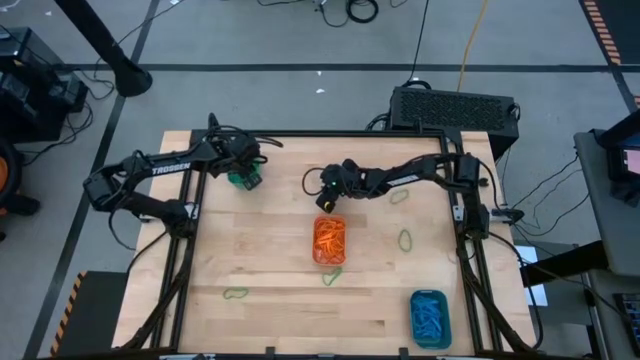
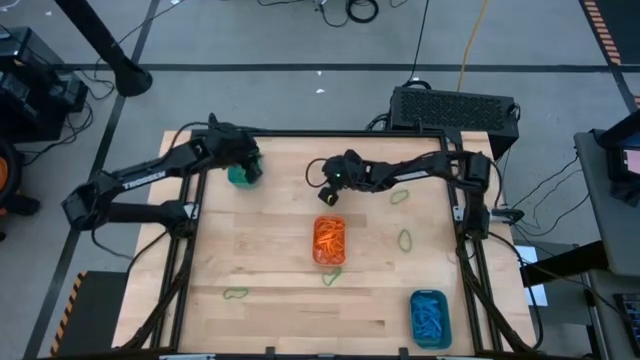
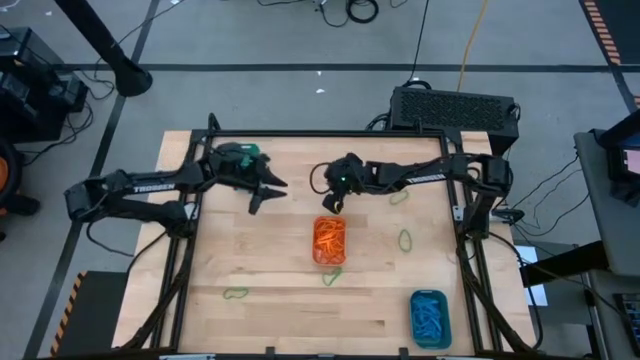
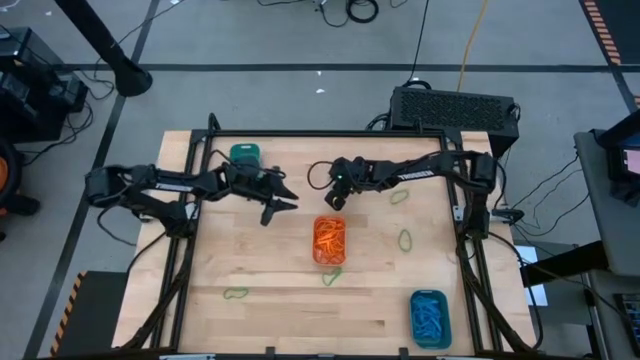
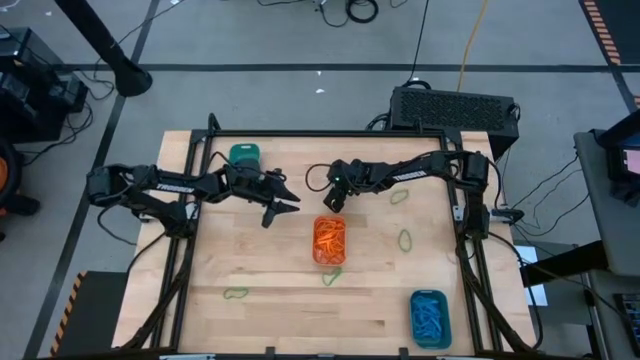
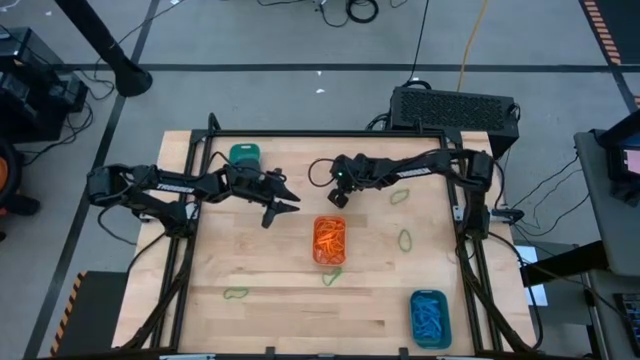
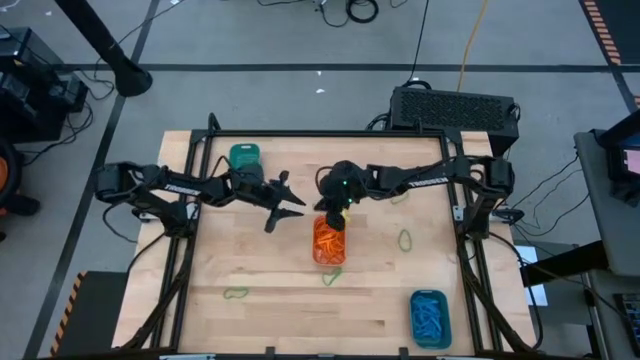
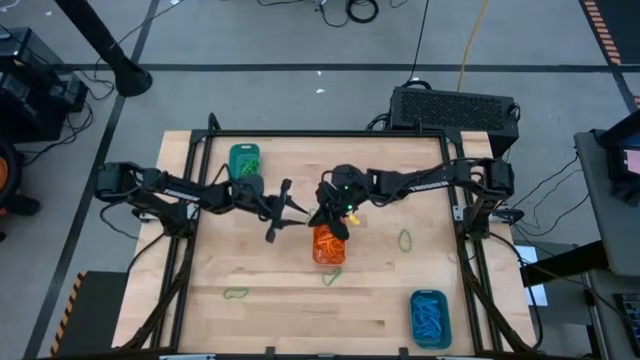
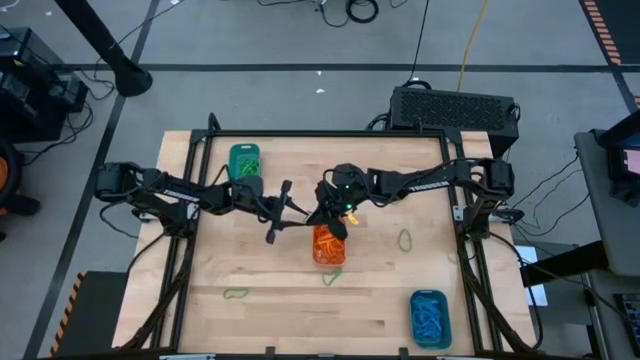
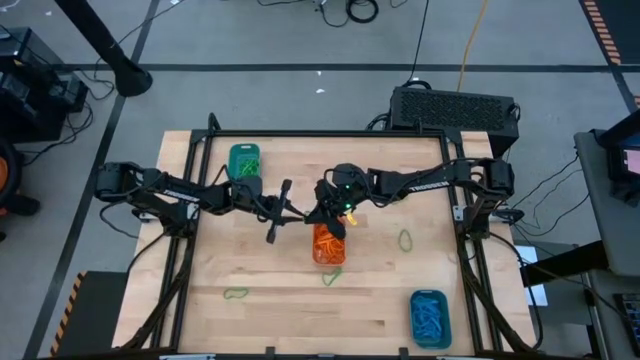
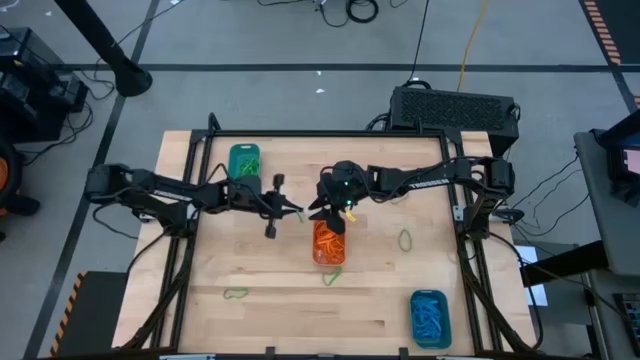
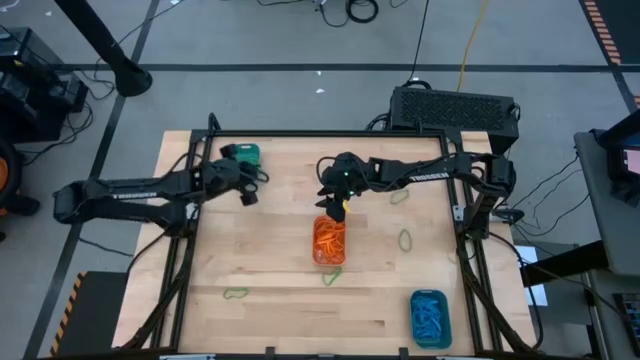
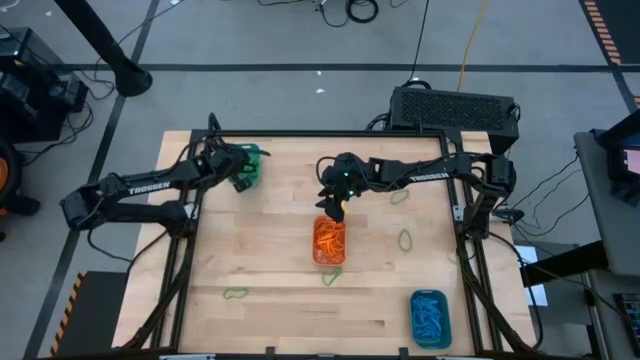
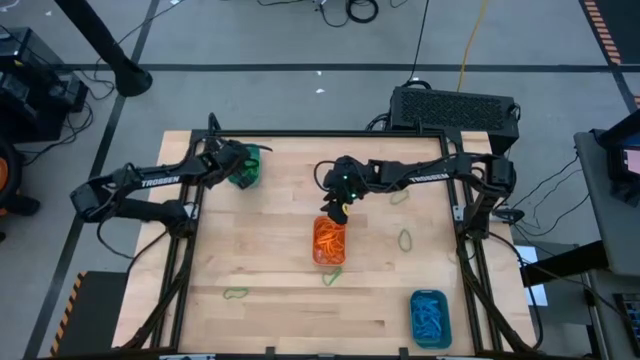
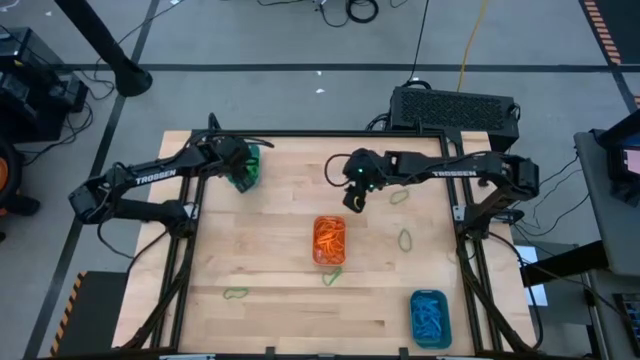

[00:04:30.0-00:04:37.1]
Task: Sort rubber bands into baskets
Put the green rubber band into the green bin

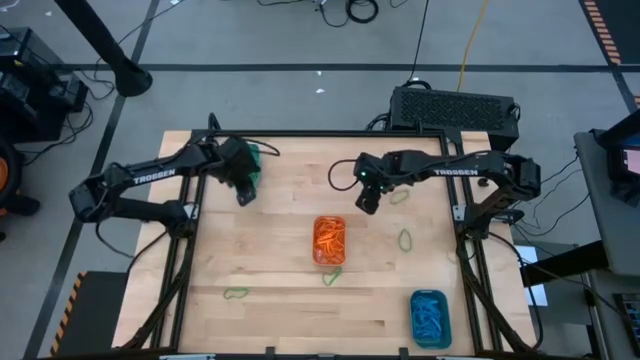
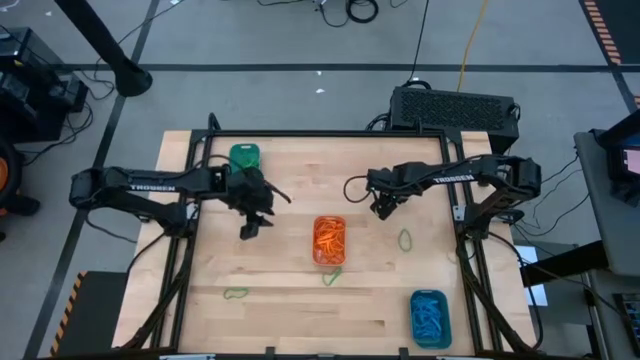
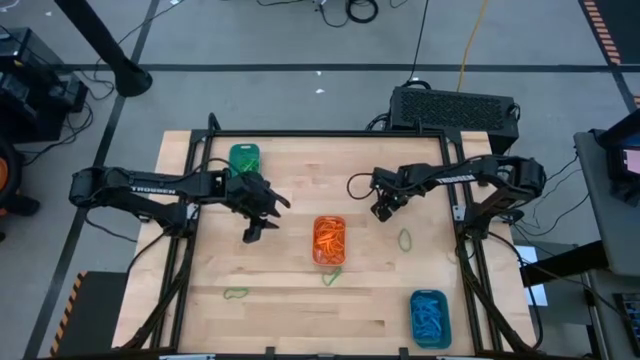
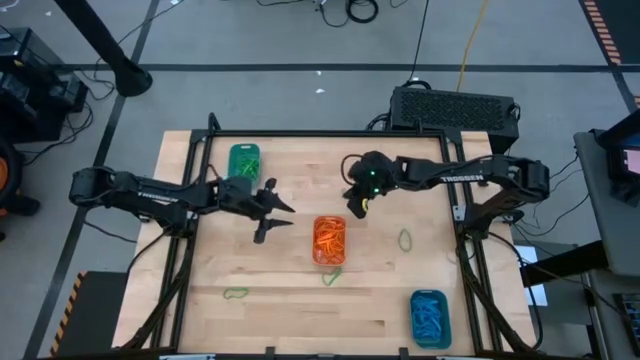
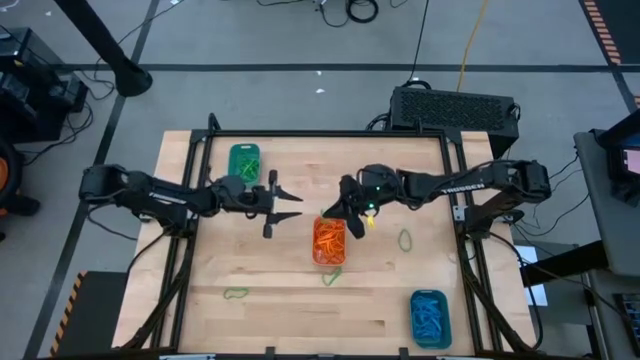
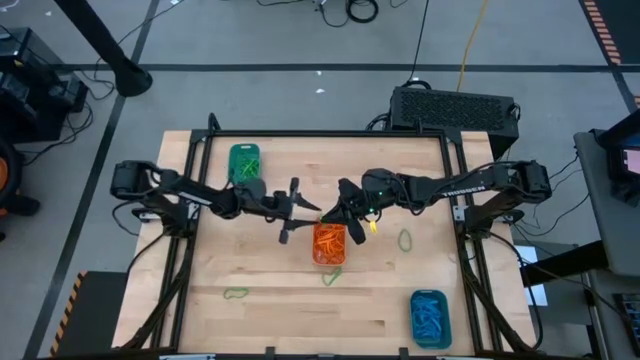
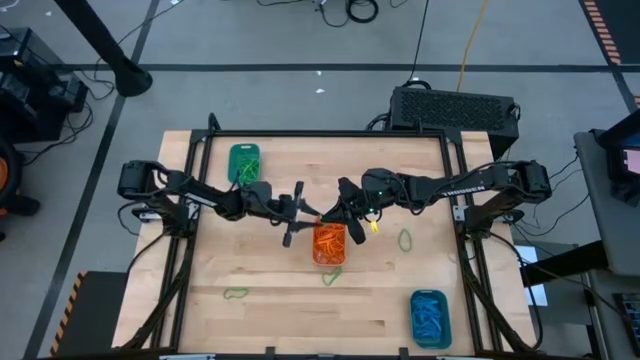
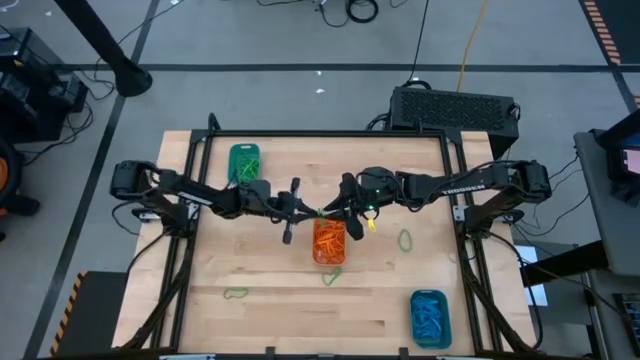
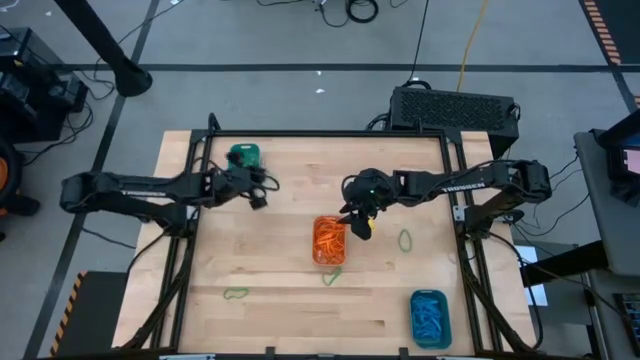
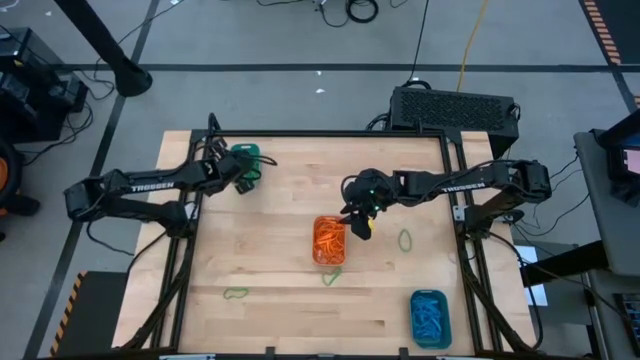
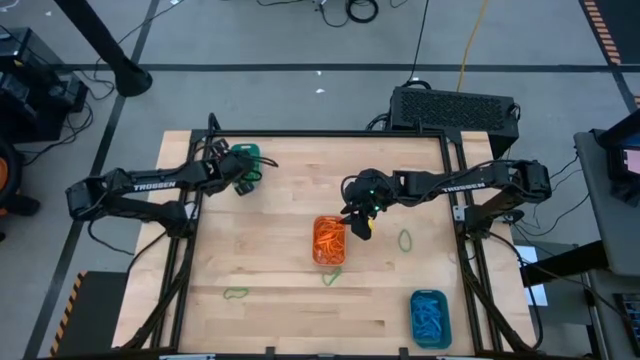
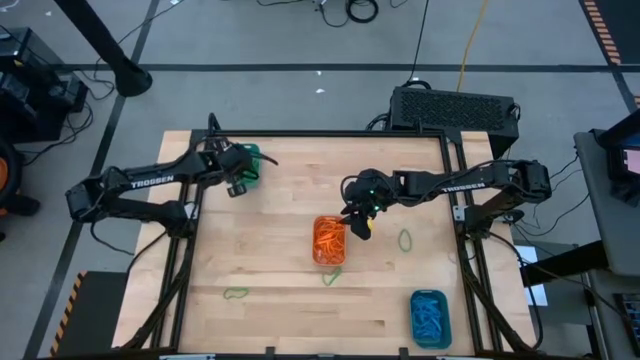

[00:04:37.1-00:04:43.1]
Put the green rubber band into the green bin

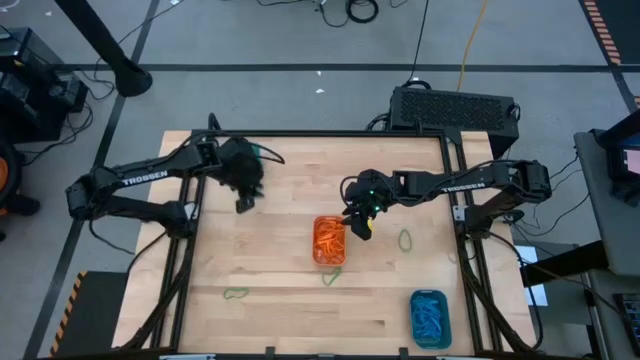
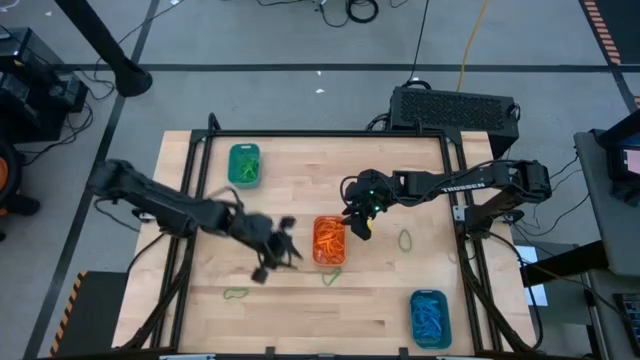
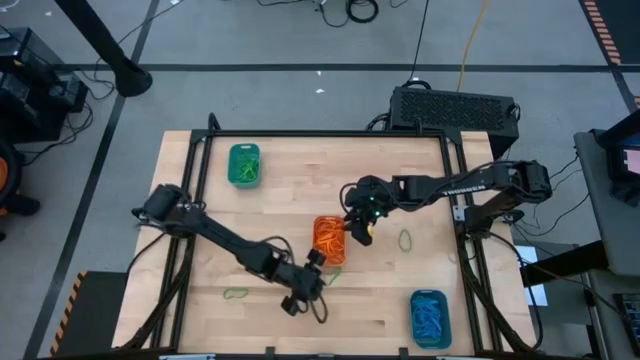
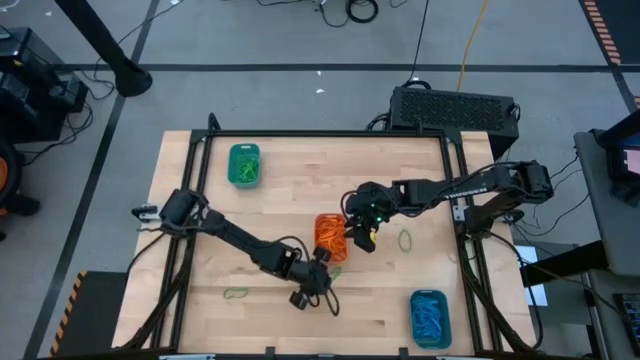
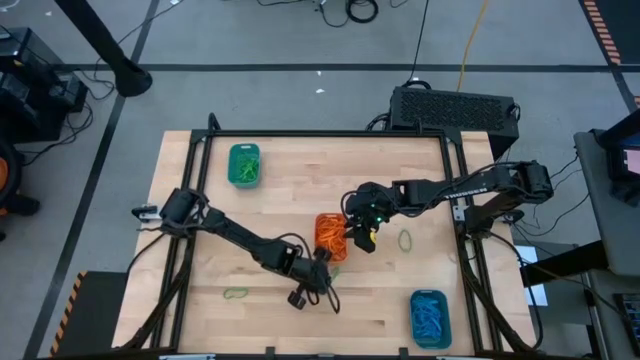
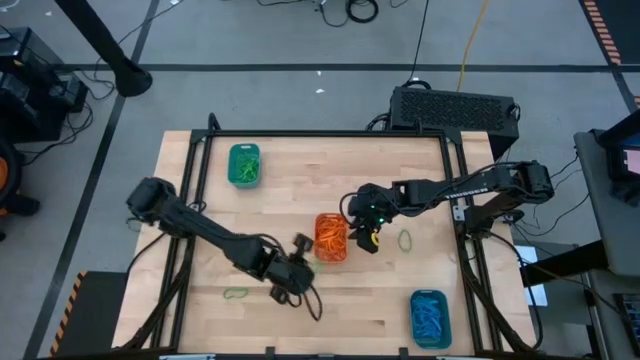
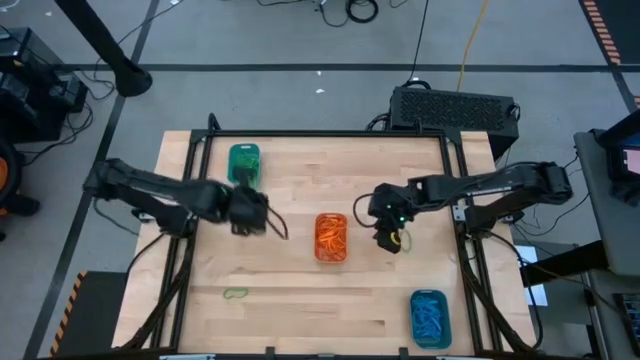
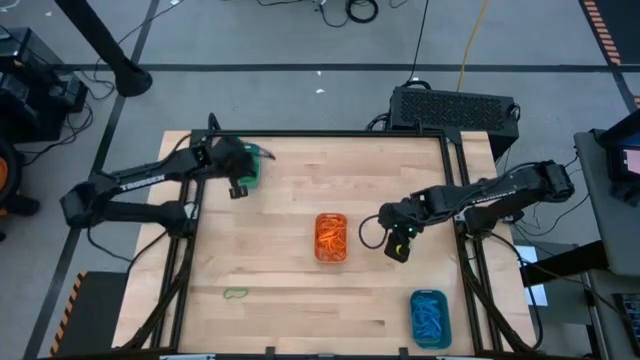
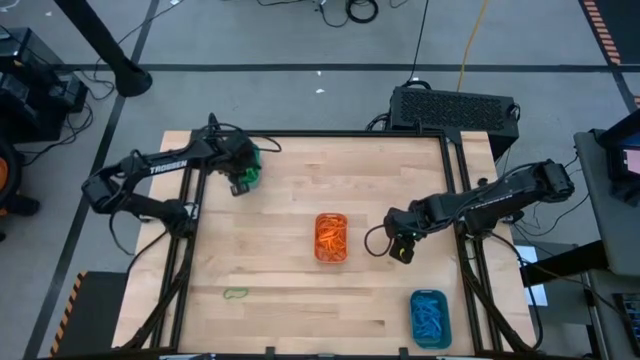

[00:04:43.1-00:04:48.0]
Put the green rubber band into the green bin

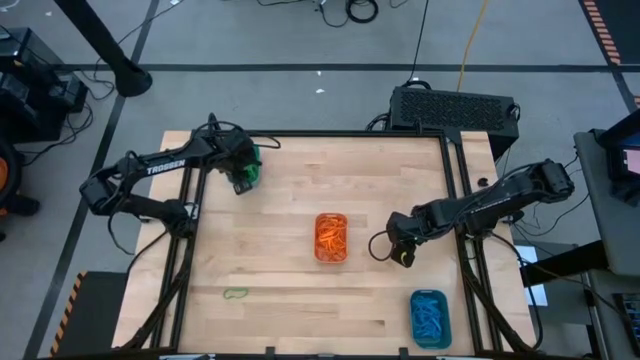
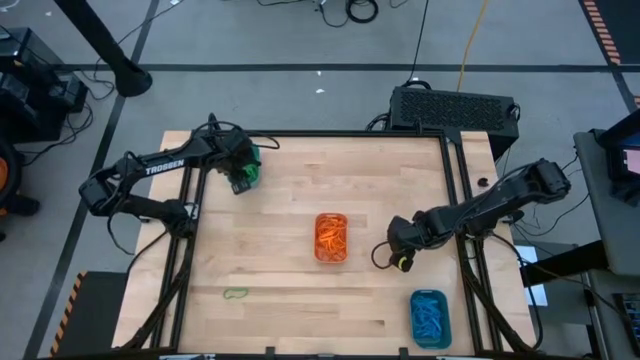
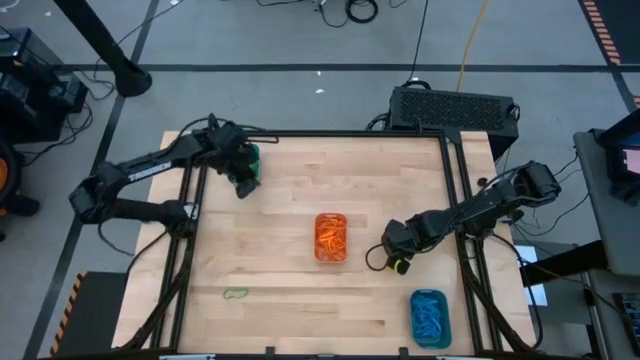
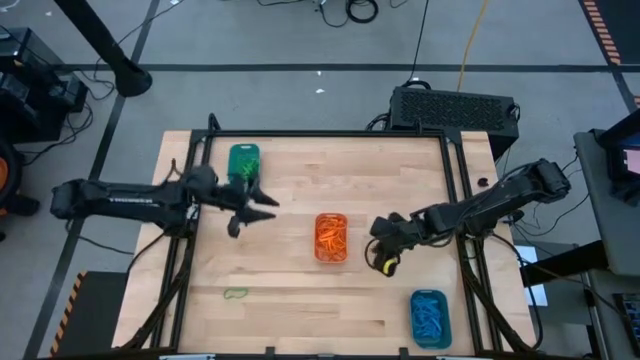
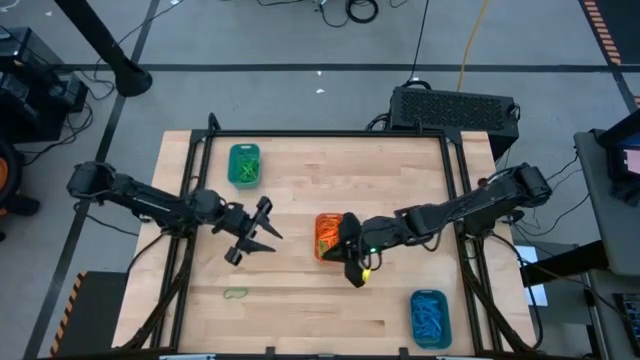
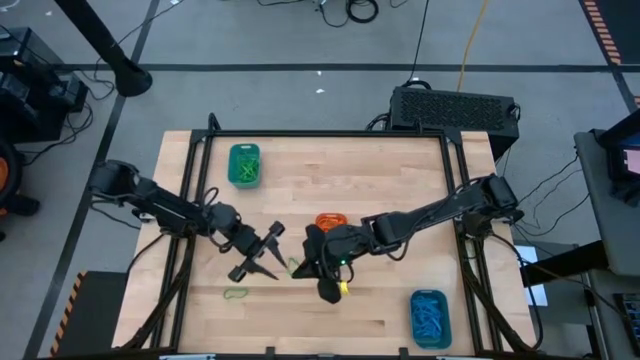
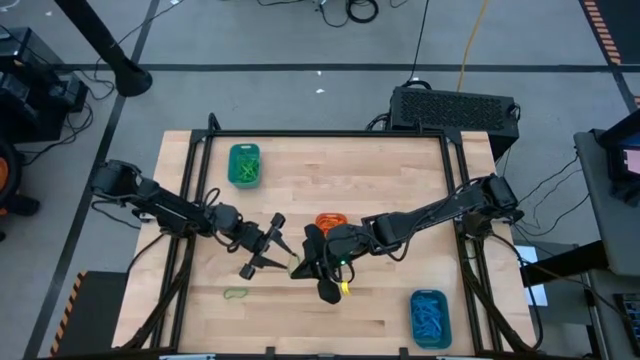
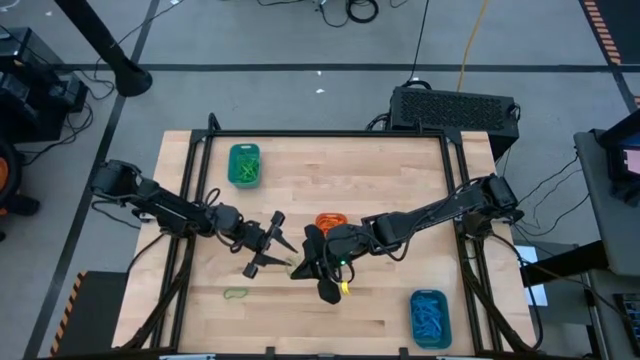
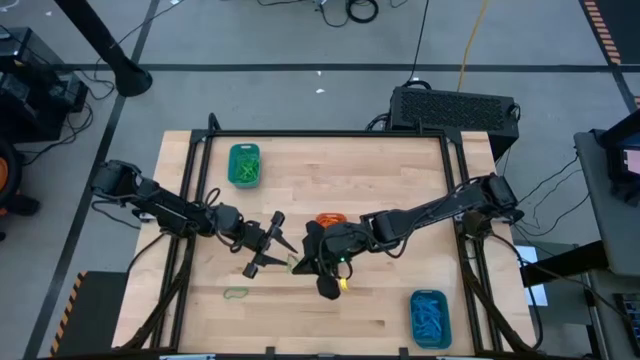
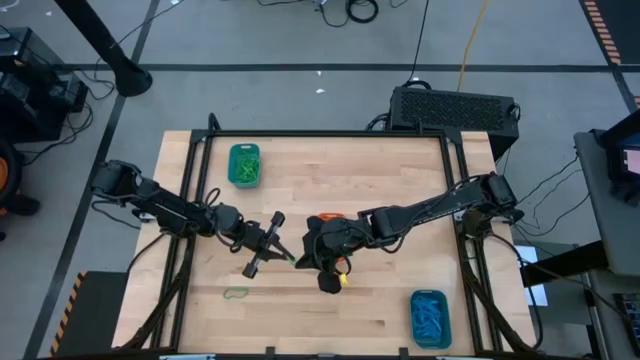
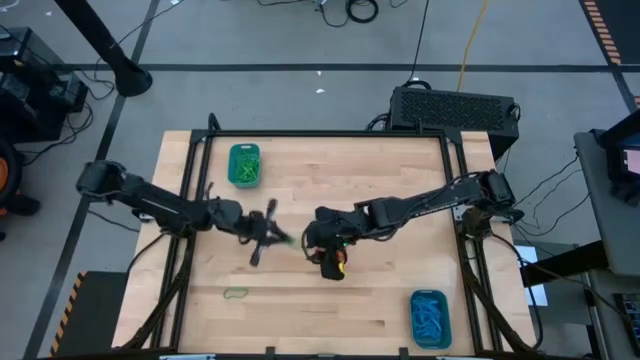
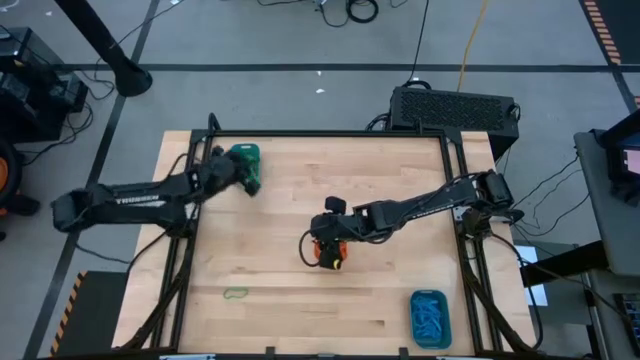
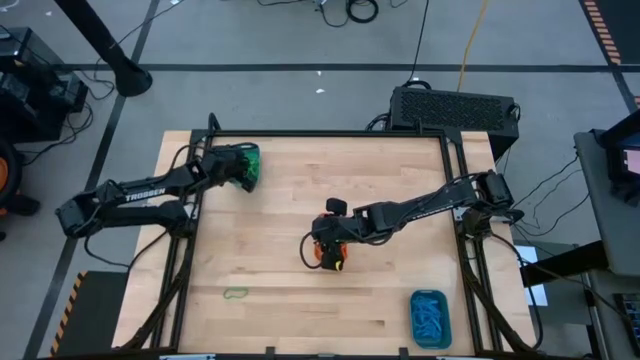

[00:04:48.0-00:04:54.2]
Put the green rubber band into the green bin
